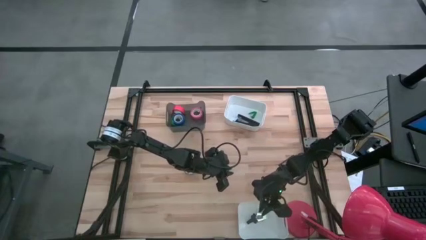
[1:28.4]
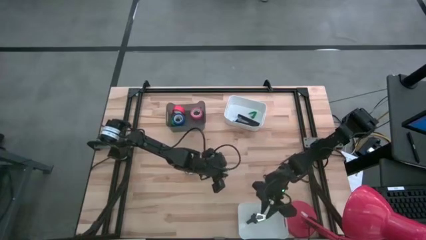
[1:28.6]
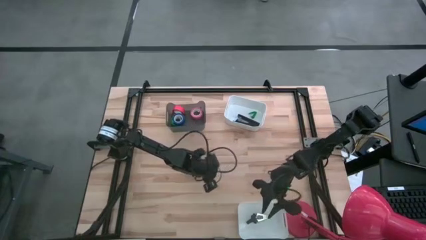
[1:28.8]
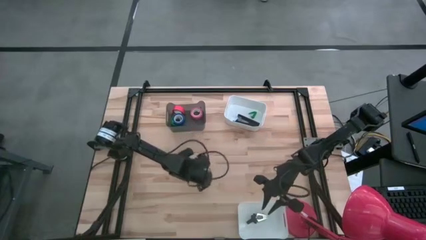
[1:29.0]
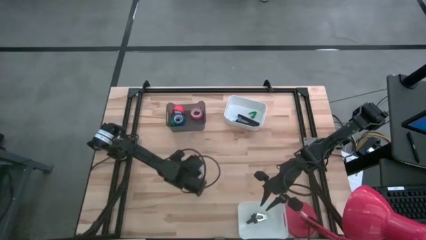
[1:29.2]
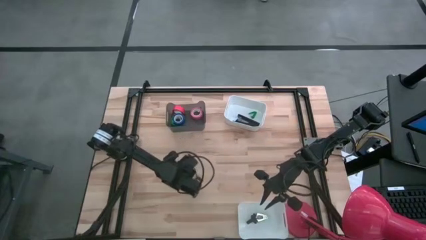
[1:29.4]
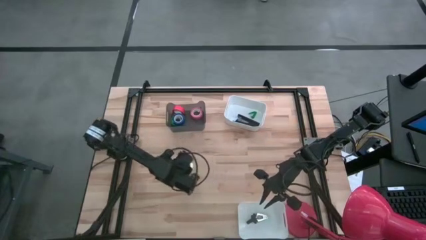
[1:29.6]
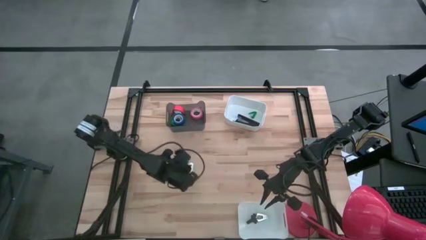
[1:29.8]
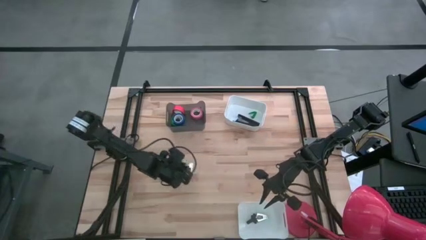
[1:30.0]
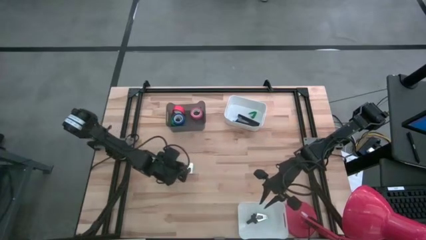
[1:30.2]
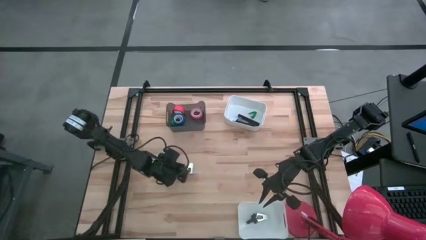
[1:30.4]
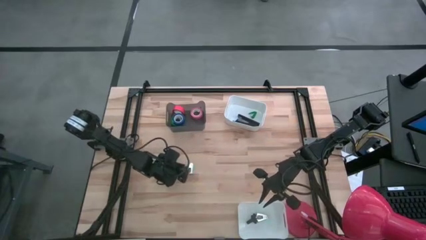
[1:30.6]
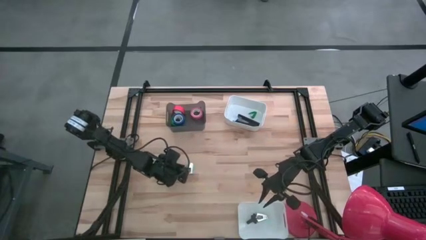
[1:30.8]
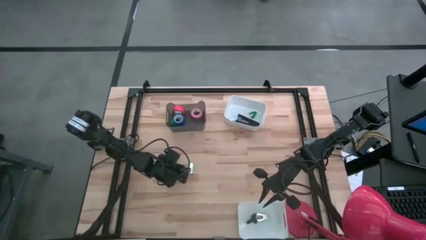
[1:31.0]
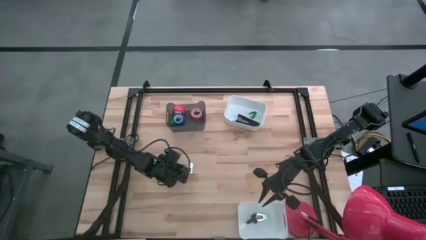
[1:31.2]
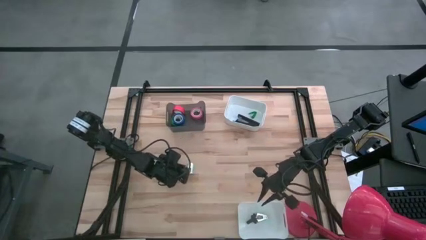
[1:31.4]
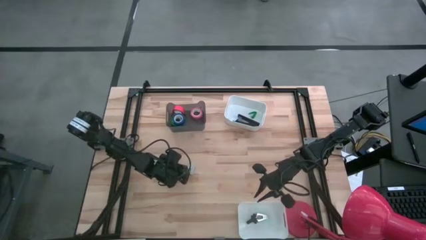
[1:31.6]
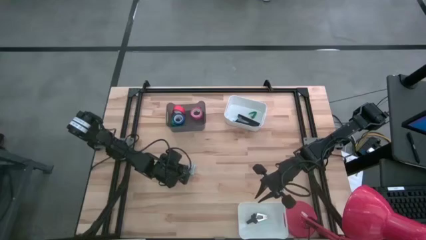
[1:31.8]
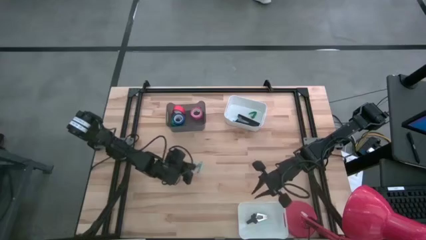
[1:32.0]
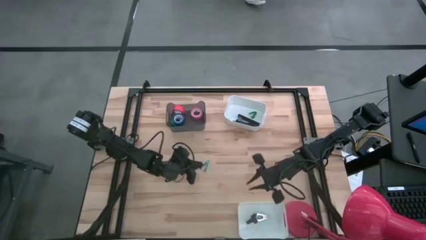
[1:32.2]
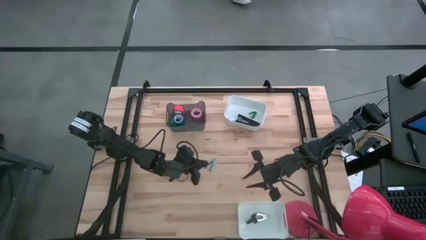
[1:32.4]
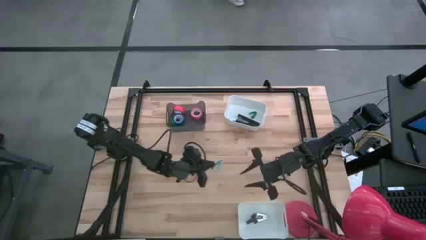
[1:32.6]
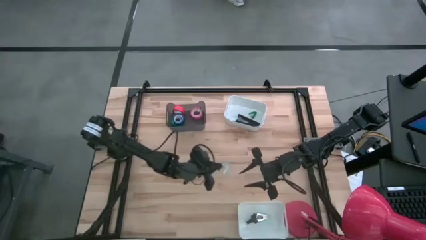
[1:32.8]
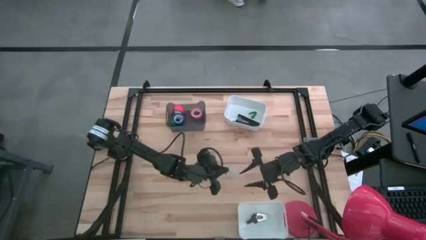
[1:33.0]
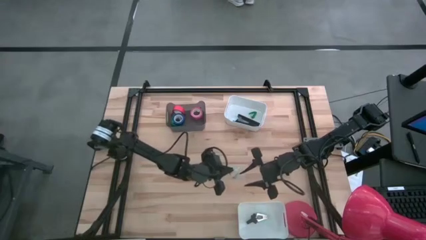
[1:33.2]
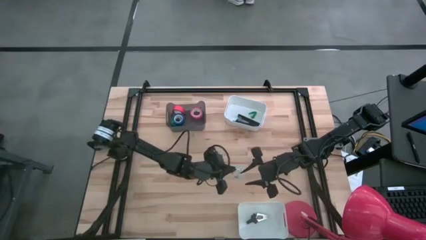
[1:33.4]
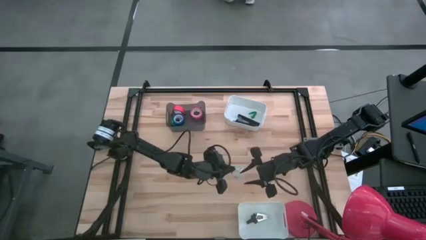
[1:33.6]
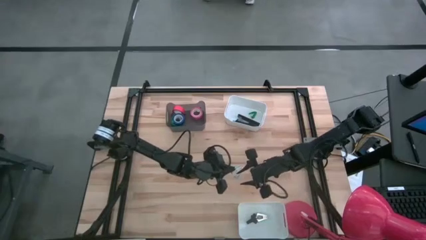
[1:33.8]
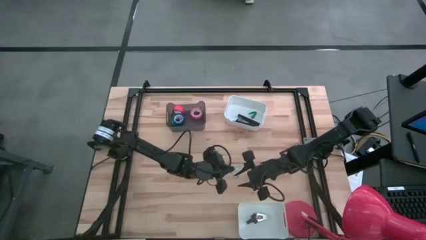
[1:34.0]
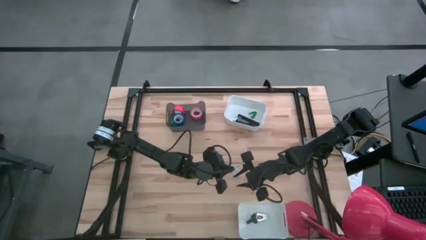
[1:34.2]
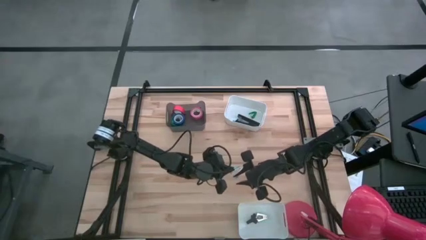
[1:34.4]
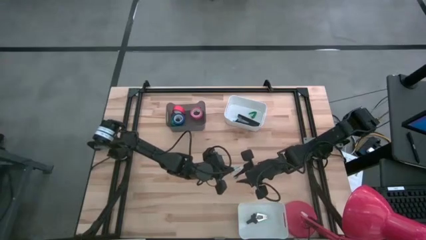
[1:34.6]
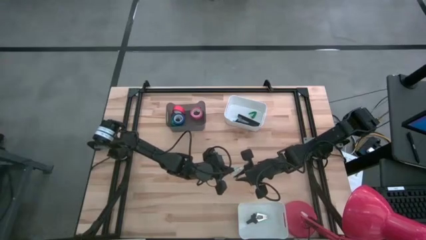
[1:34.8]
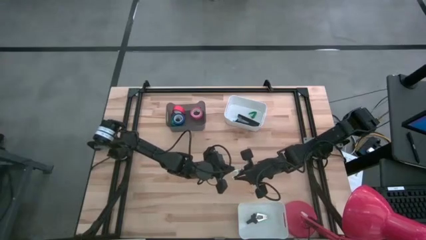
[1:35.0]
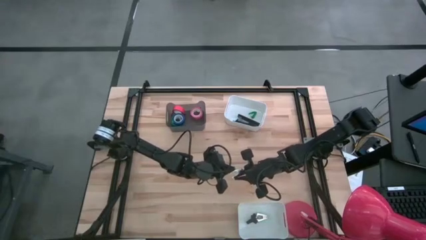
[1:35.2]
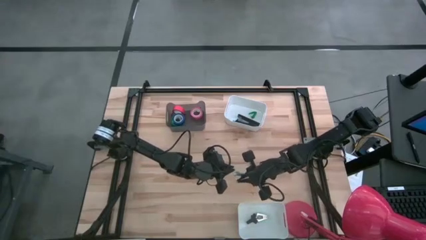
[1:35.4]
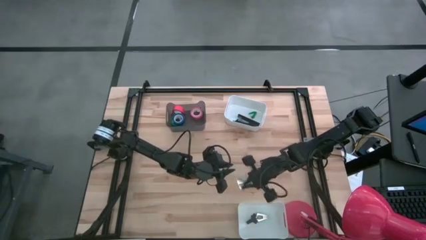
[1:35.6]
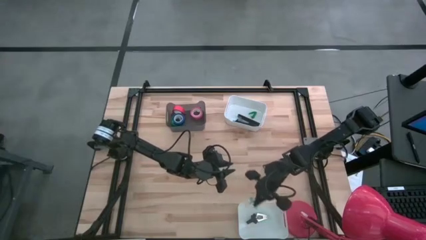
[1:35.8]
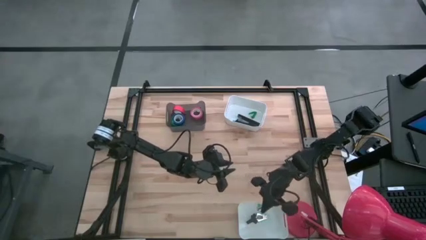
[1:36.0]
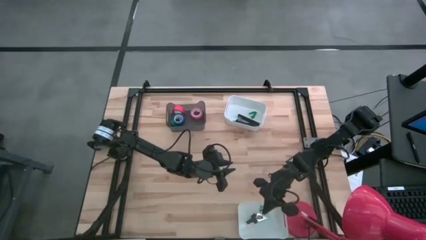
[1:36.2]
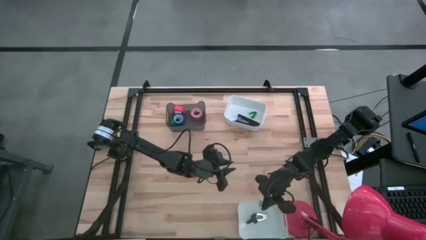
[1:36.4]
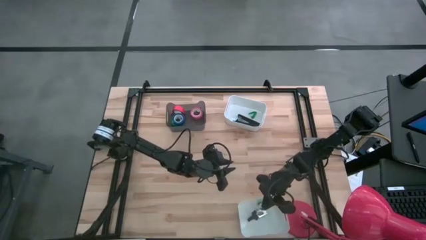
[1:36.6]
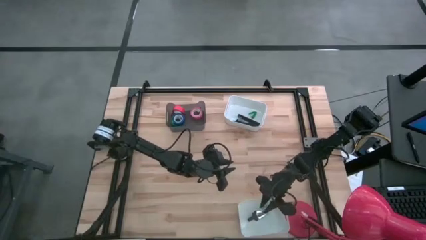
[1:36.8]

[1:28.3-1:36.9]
Task: Pick and place Stapler, Stapler remover, tape
Put the blue staple remover into the bottom white bin

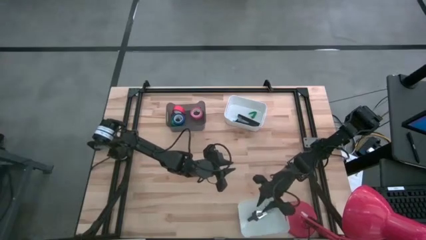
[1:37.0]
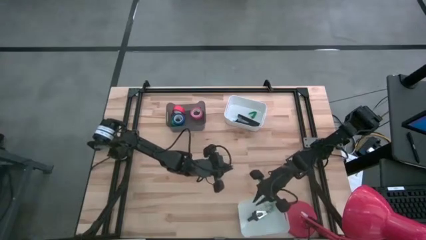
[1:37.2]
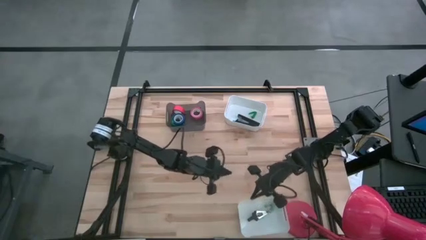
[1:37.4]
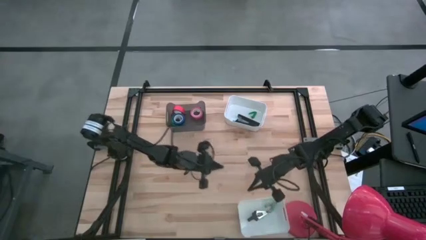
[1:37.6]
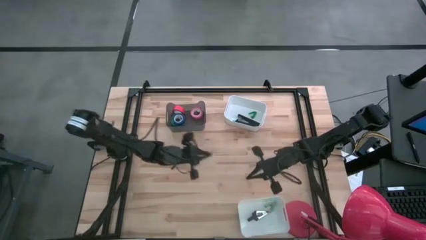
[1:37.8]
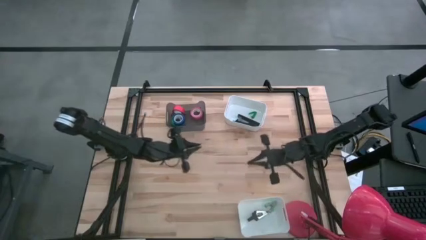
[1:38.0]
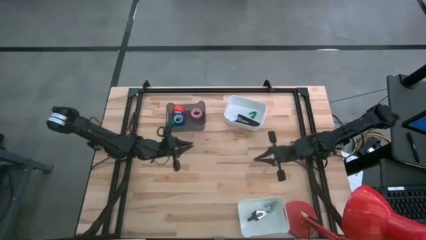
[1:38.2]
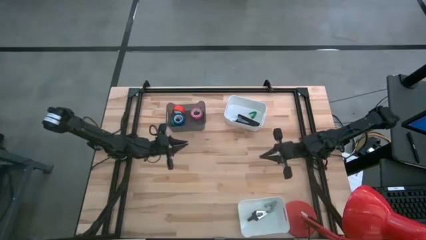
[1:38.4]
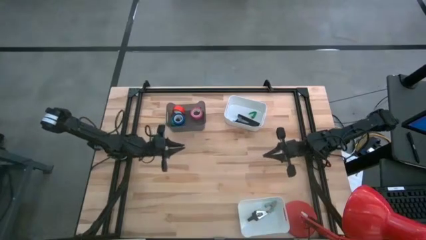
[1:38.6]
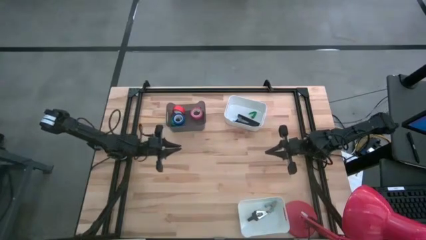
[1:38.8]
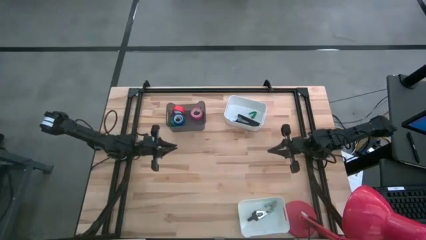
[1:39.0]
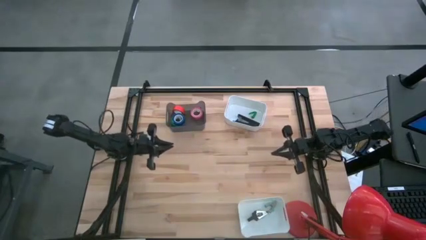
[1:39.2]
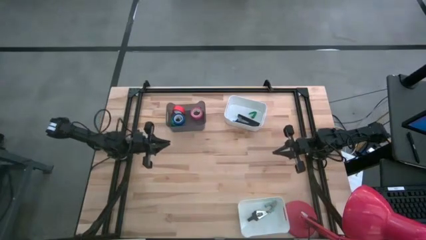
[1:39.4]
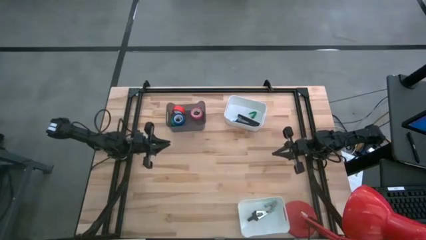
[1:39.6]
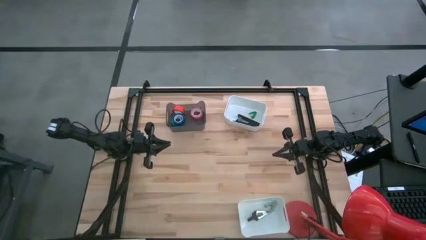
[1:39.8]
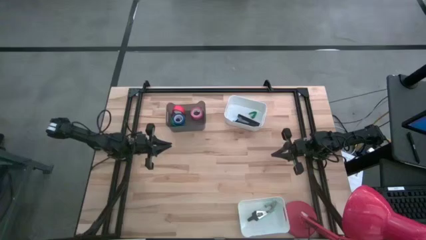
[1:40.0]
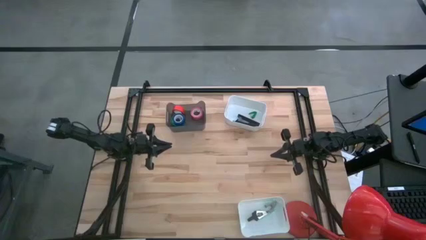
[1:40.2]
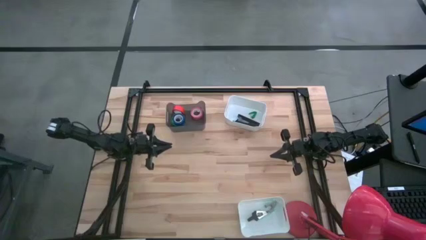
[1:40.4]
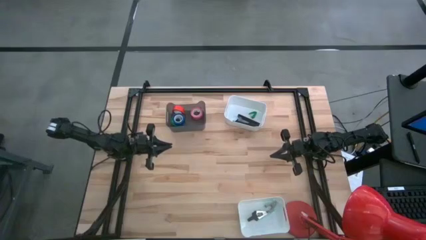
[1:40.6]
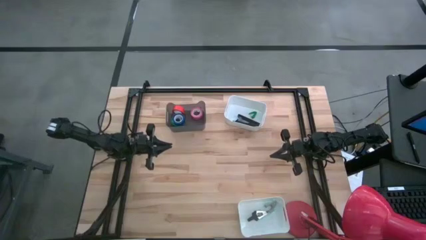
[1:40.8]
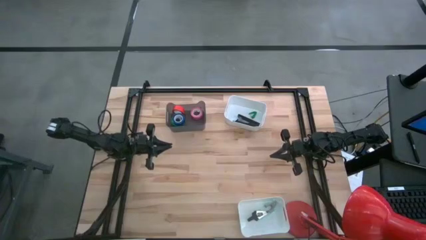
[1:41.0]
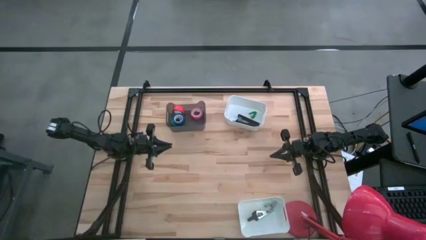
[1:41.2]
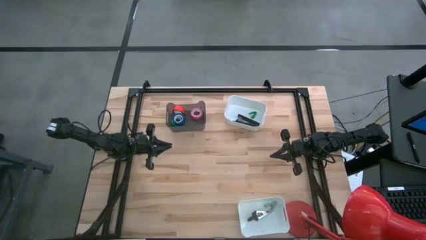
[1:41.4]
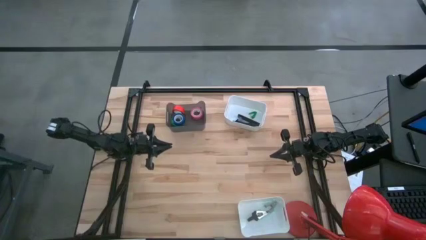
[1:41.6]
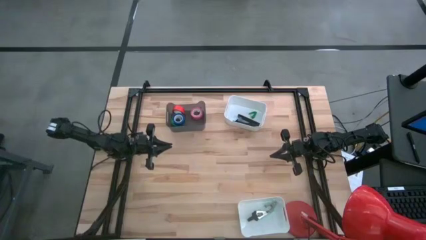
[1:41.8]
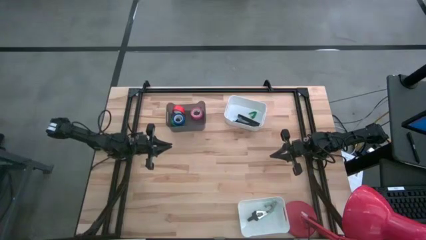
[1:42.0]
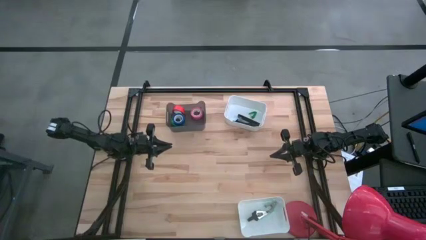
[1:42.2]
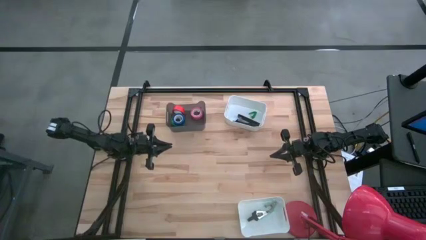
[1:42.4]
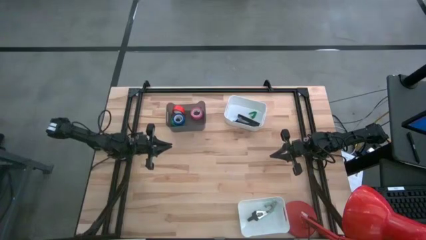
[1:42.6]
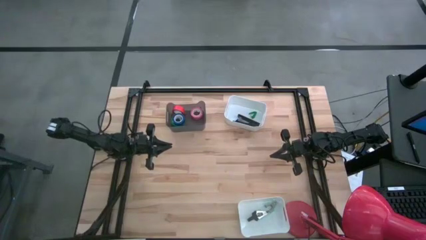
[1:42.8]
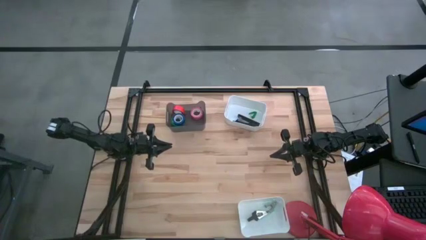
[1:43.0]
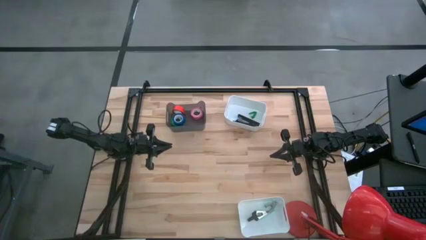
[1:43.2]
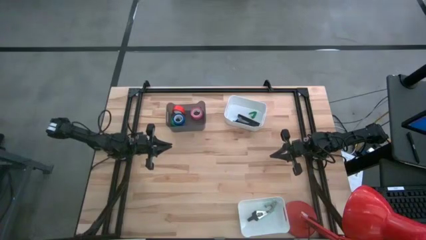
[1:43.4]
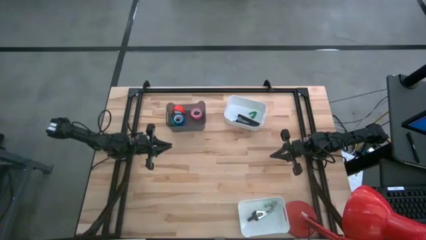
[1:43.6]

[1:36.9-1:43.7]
Return to Home Position

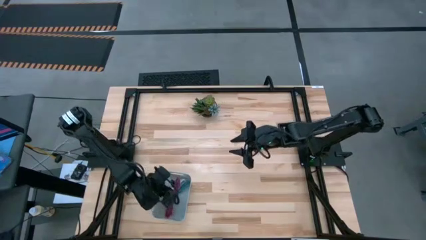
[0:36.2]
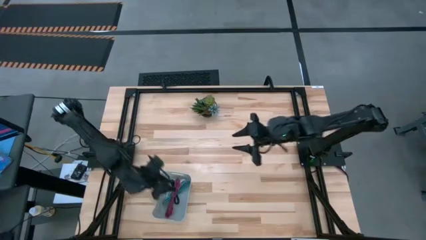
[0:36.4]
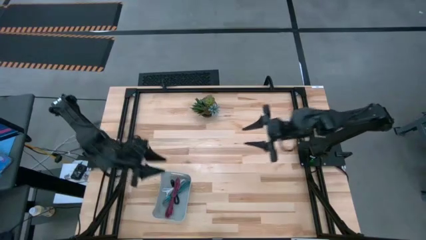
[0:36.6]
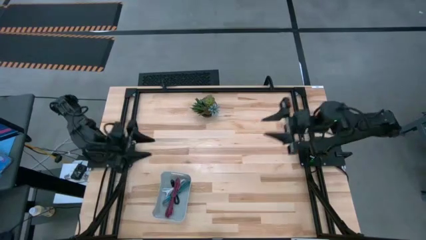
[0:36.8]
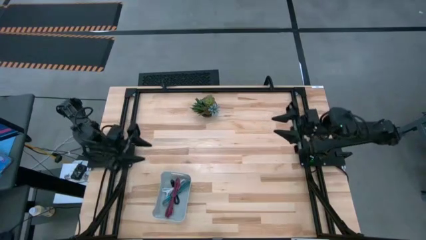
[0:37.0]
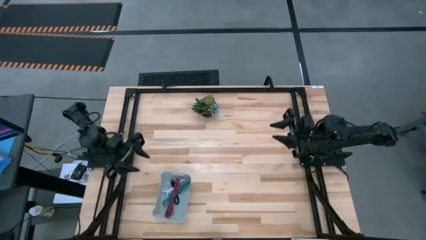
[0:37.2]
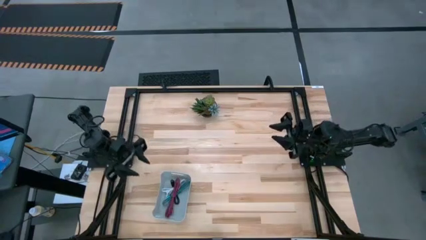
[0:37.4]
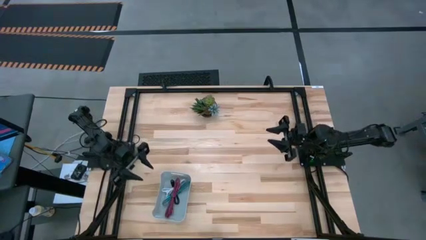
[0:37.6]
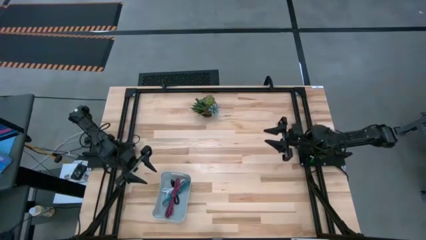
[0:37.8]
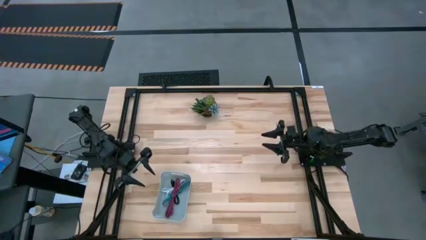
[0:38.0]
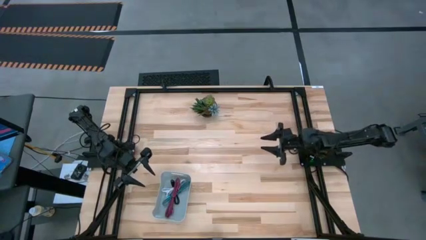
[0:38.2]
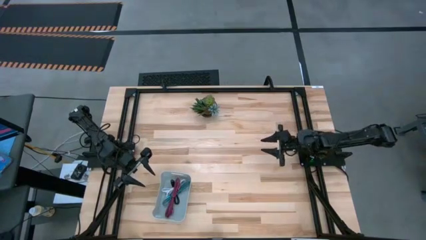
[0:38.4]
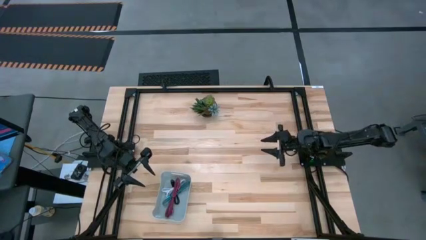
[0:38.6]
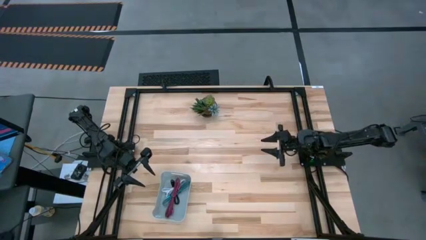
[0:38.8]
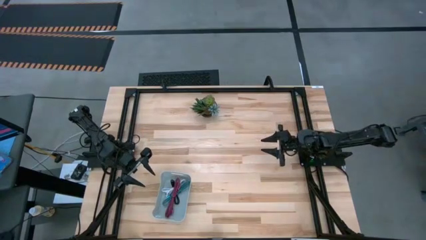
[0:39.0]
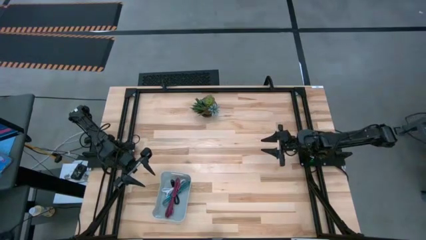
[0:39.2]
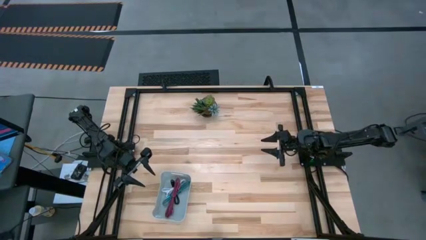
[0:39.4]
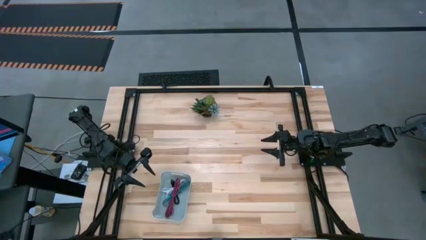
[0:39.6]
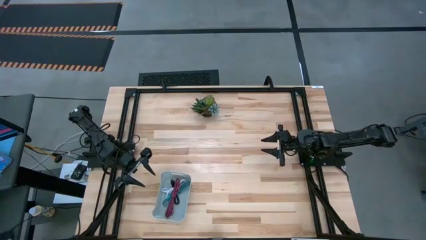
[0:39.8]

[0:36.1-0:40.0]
Task: Pick and place USB-C Cables
Return to Home Position
